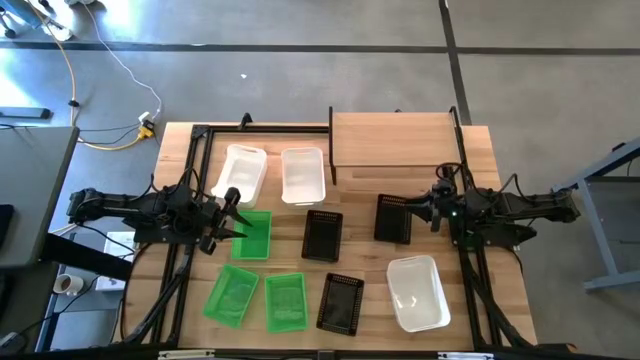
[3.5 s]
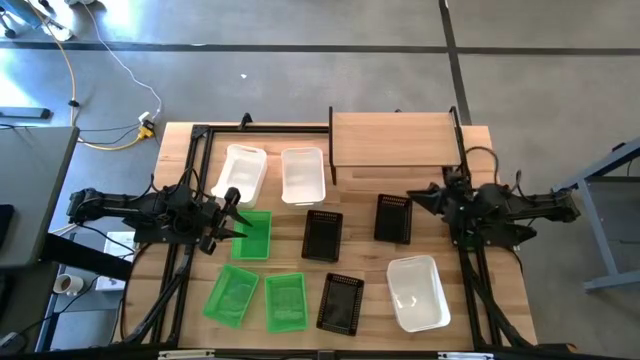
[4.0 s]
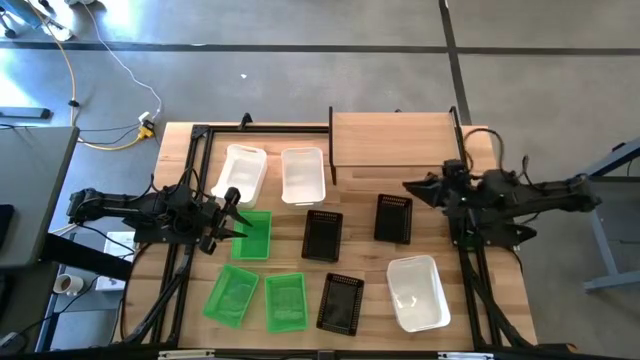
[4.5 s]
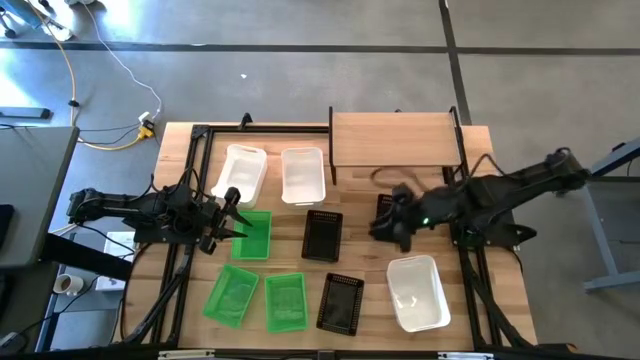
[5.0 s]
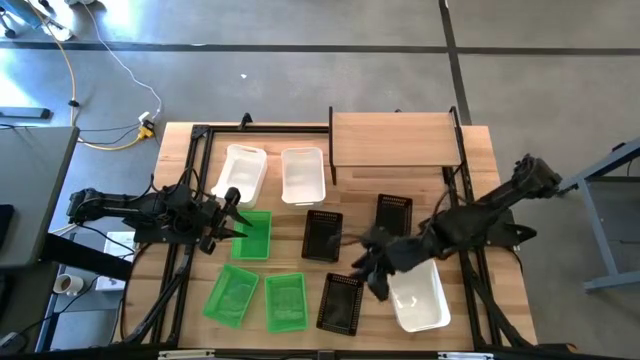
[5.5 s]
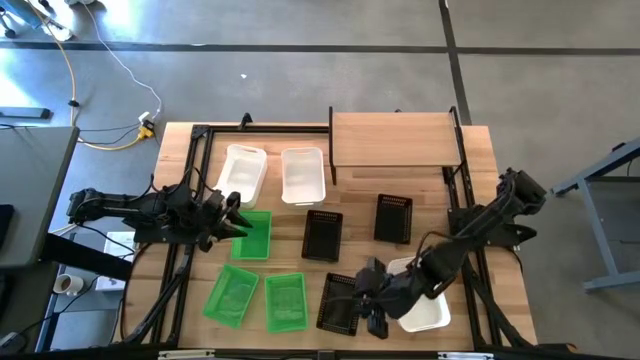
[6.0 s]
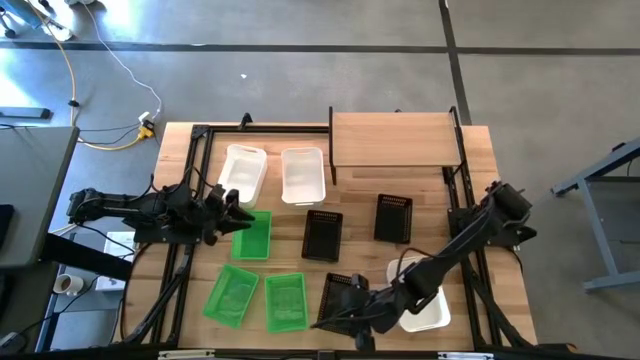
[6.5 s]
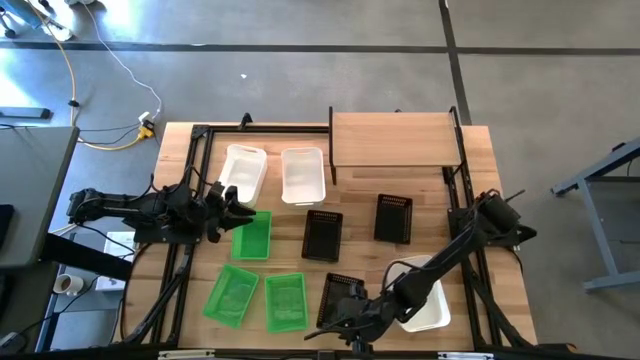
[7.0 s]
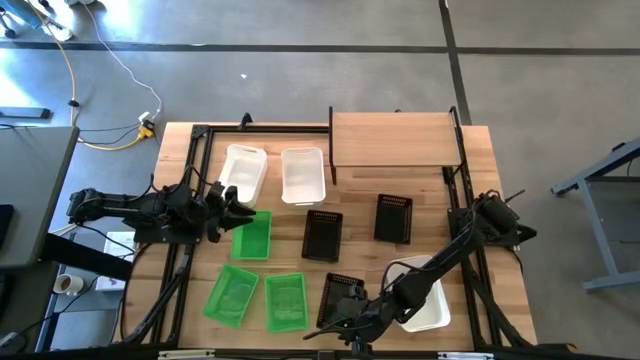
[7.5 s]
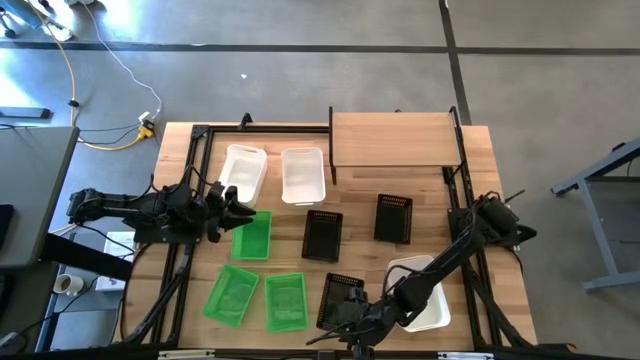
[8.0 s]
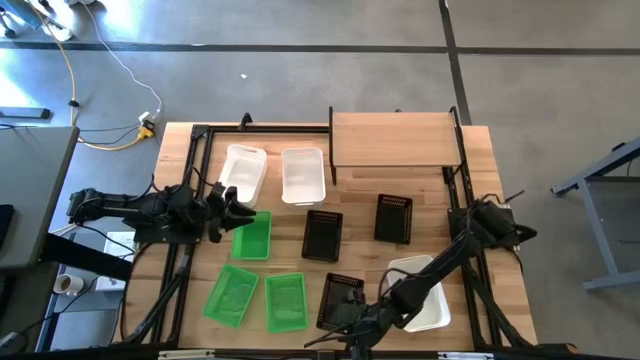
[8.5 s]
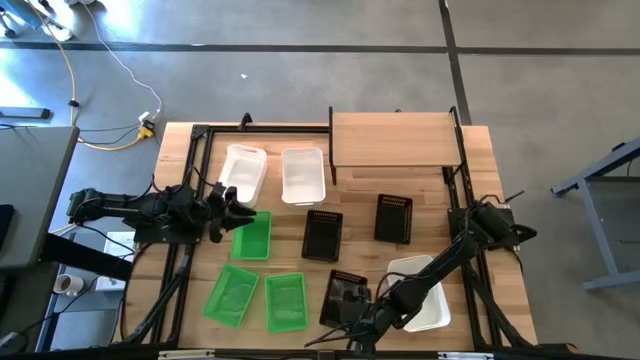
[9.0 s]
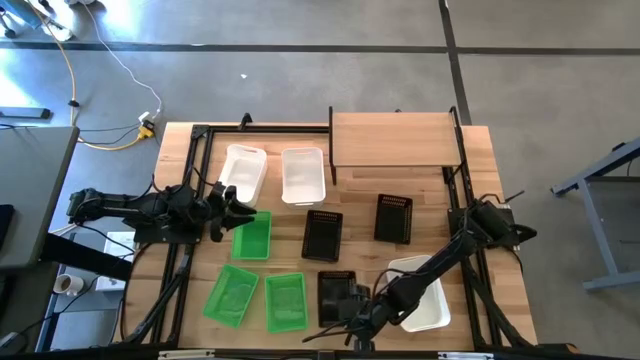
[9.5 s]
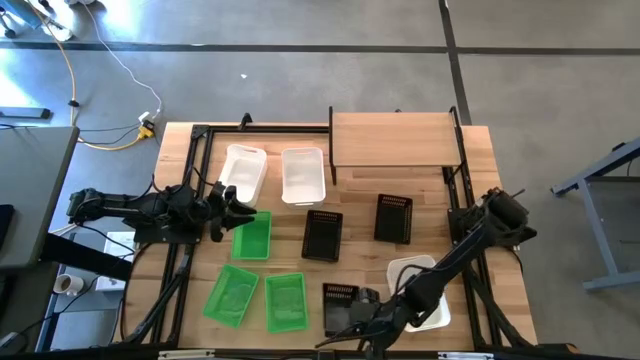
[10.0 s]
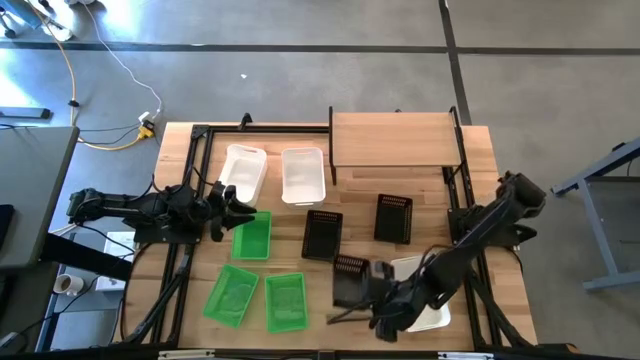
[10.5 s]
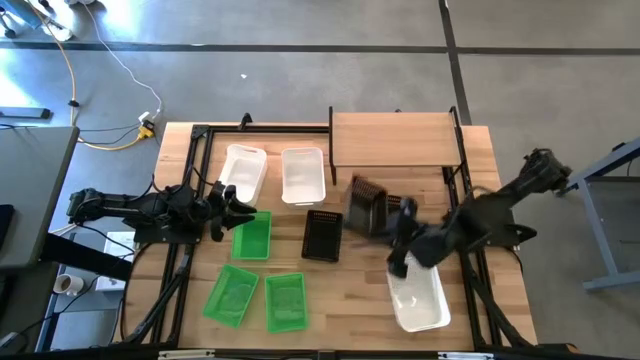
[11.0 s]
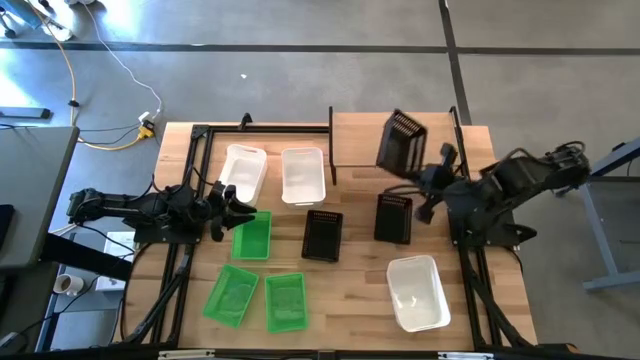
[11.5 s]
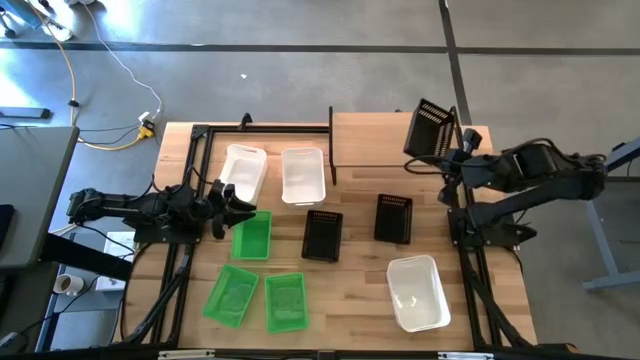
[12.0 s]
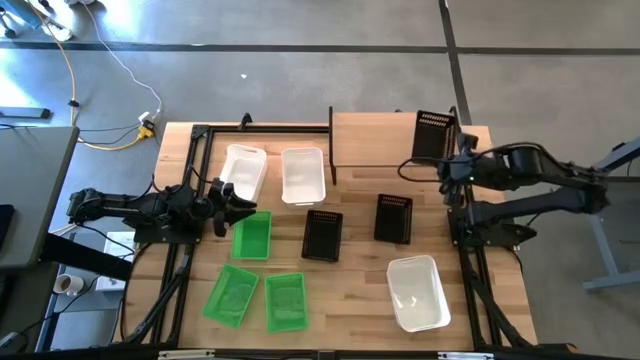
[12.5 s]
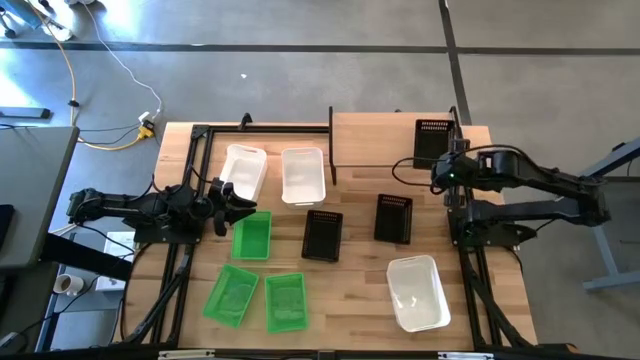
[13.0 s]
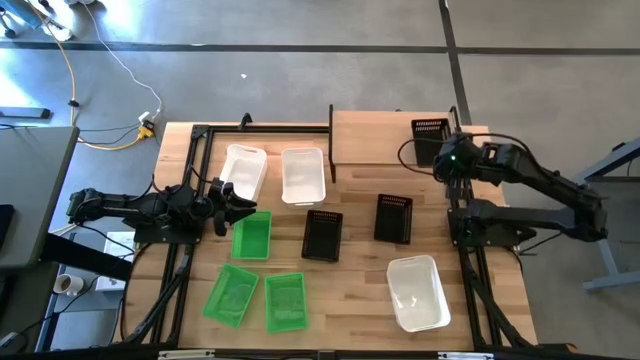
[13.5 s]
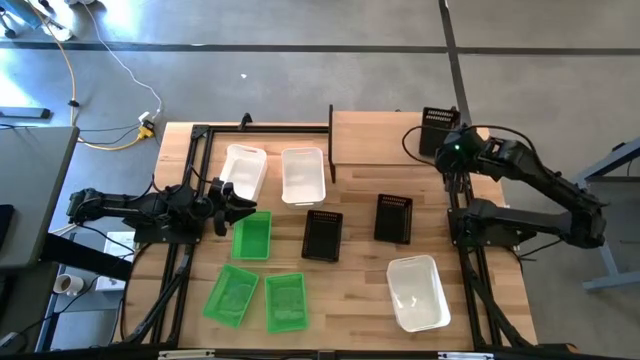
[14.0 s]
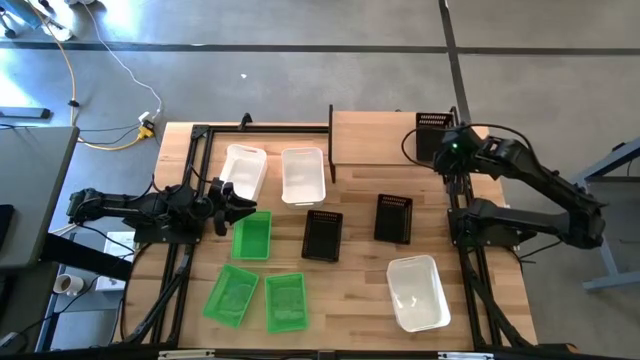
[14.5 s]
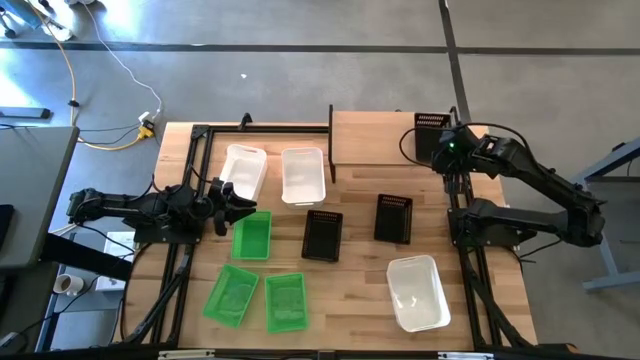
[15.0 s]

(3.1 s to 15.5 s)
Task: Stack baskets on shelf by color
Put the bottom black bin on the shelf

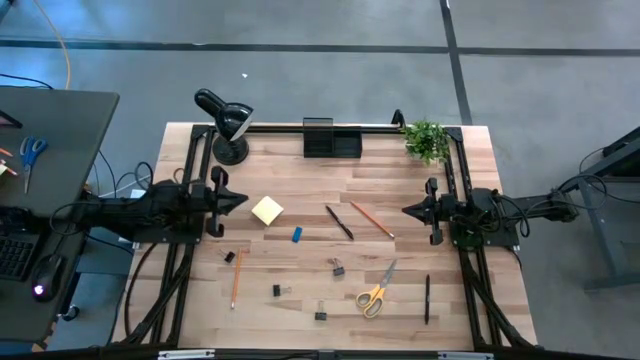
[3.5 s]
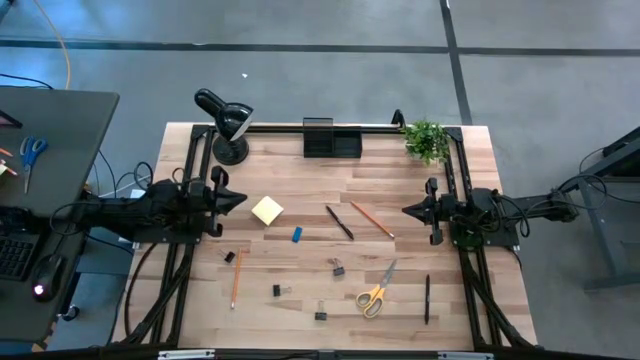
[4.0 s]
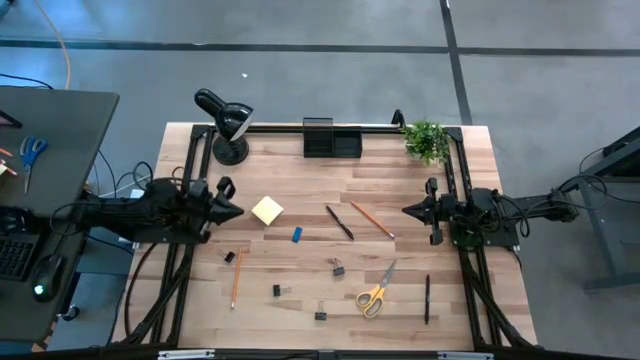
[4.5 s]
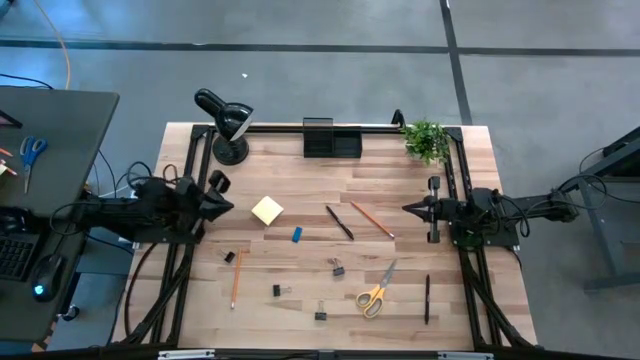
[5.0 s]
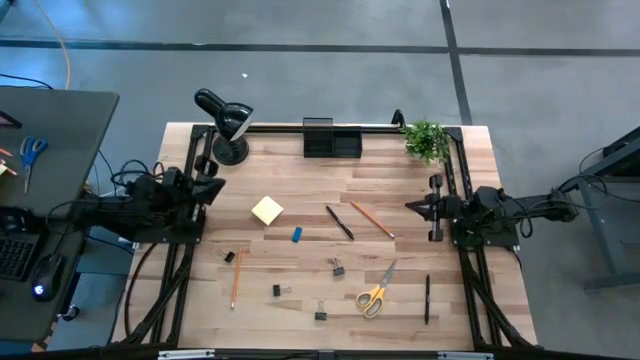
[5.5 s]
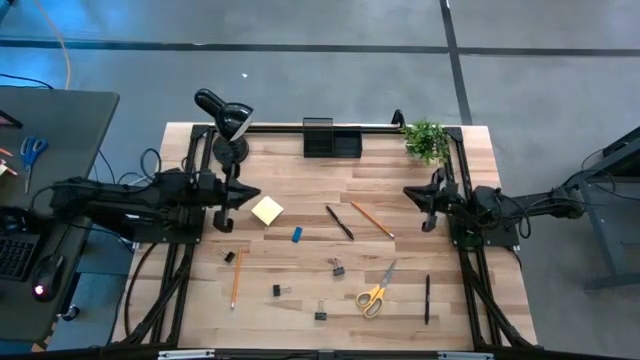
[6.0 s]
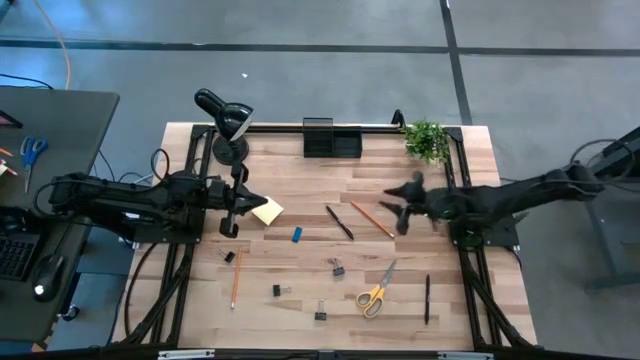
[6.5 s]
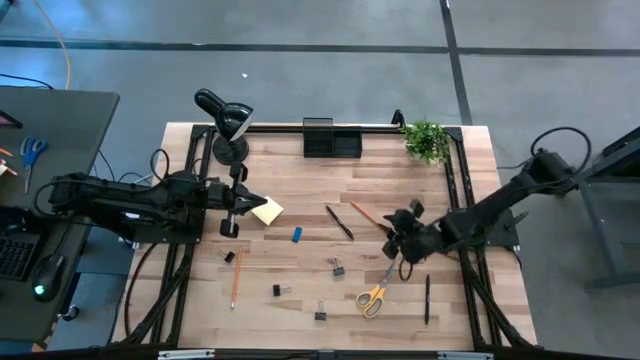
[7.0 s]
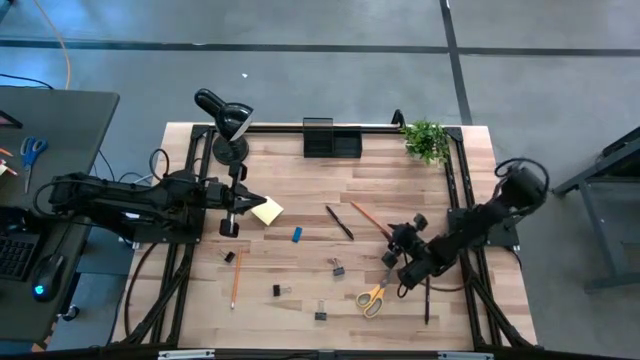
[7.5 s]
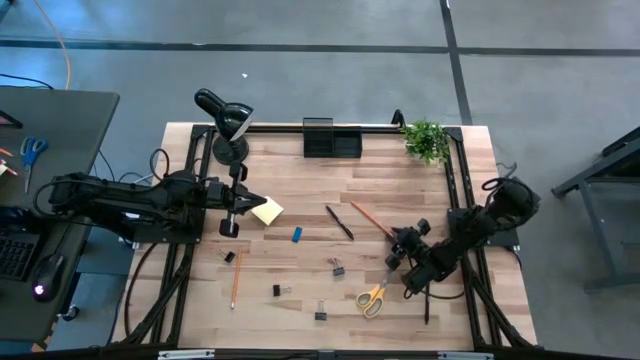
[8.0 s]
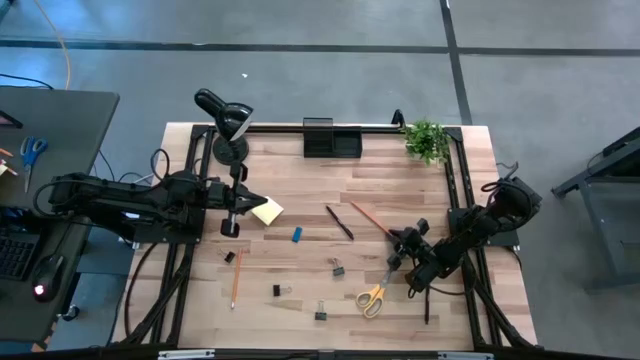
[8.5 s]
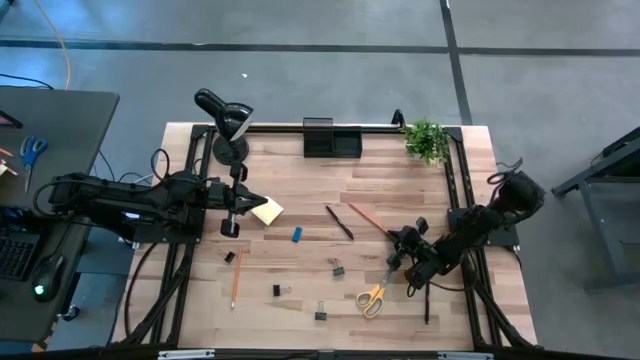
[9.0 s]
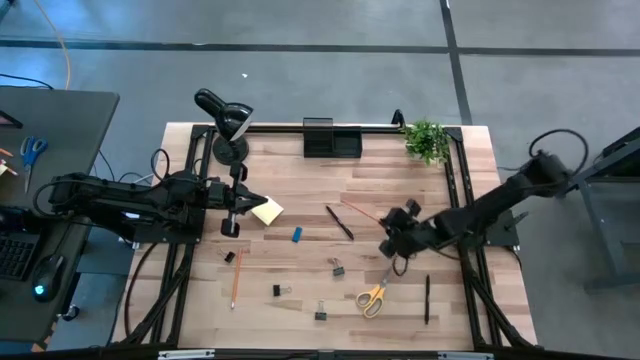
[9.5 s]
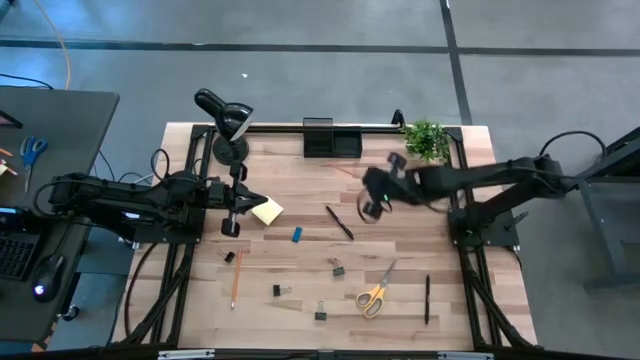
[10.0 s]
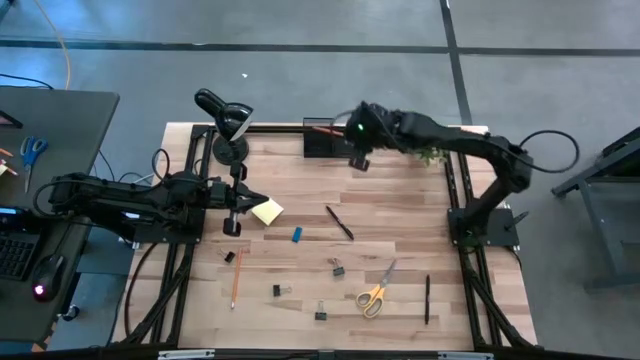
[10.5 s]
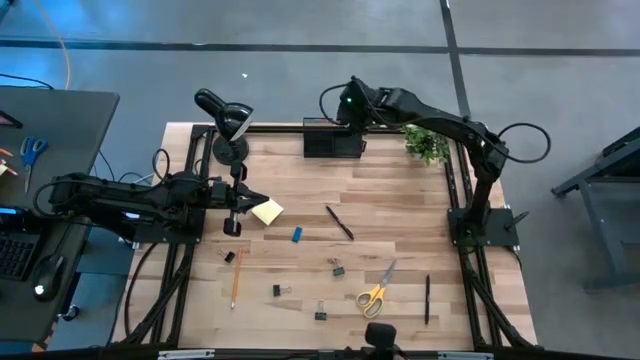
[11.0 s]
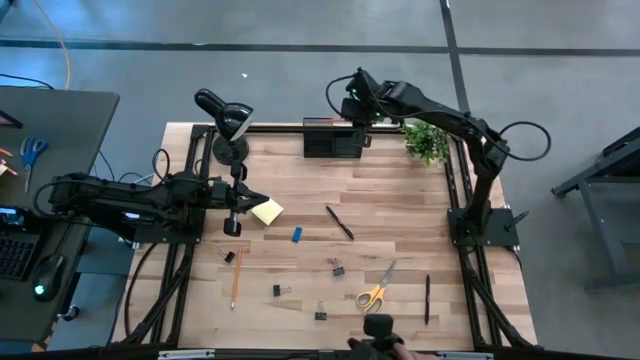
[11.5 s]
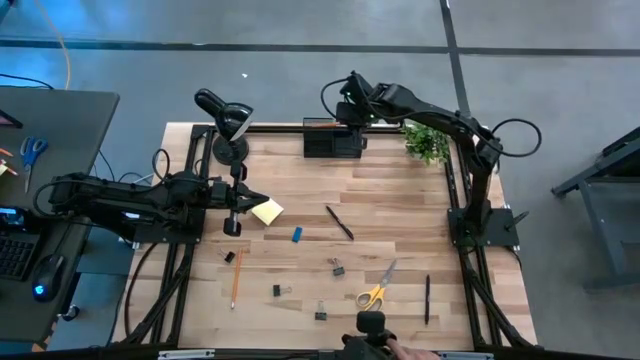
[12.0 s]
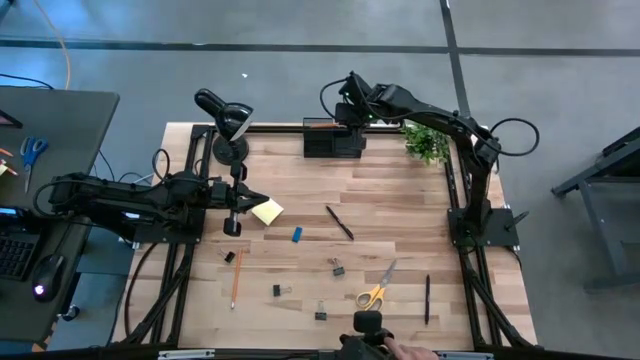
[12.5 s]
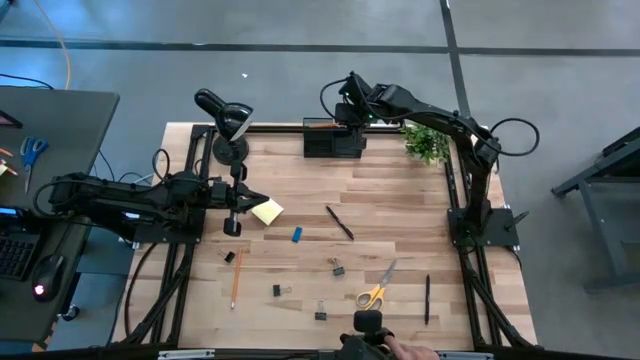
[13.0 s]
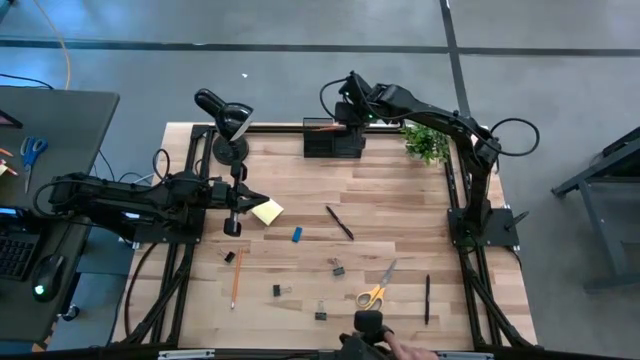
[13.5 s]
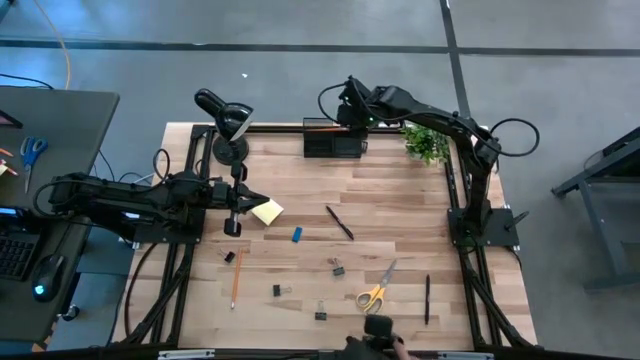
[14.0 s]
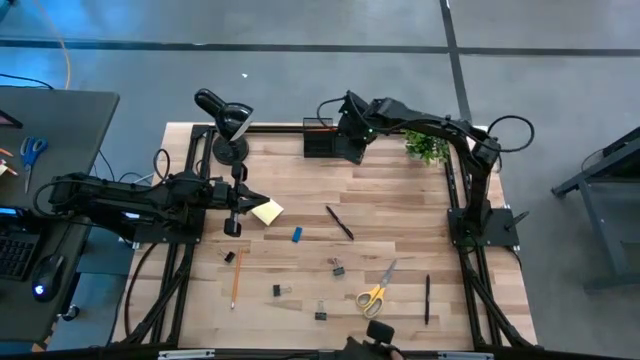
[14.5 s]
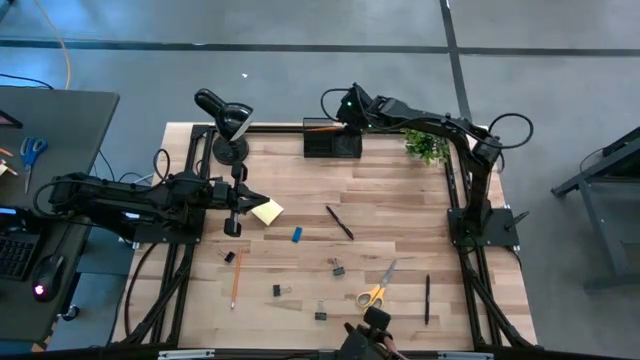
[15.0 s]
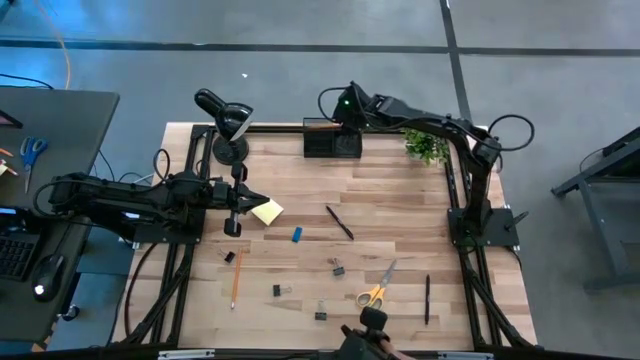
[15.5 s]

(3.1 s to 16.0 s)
Task: Pick and place office supplies into organizer
Put the orange pencil into the black desk organizer
